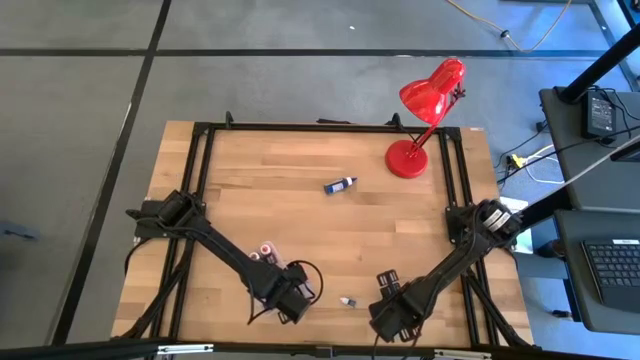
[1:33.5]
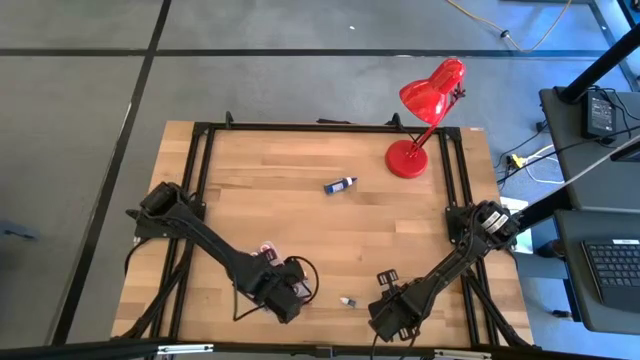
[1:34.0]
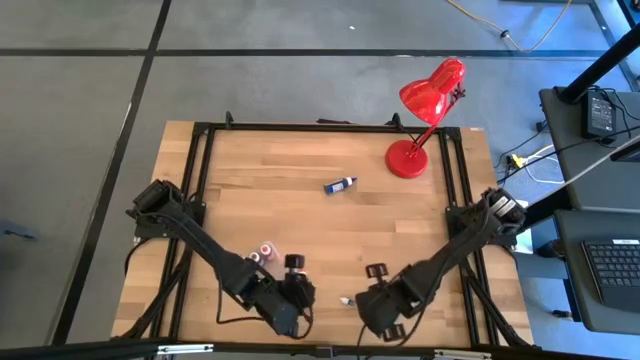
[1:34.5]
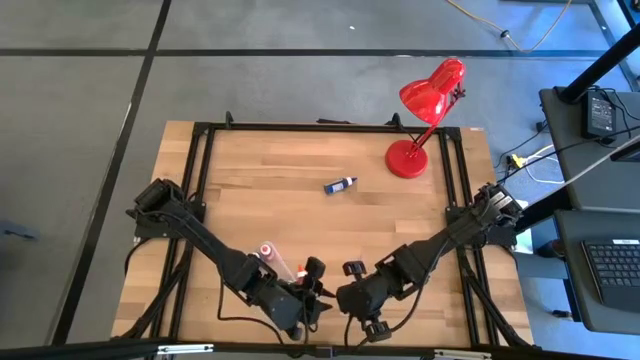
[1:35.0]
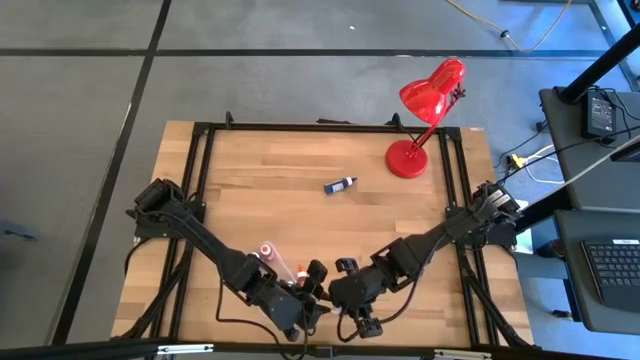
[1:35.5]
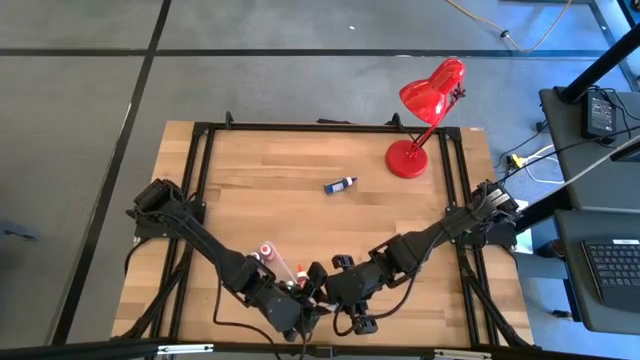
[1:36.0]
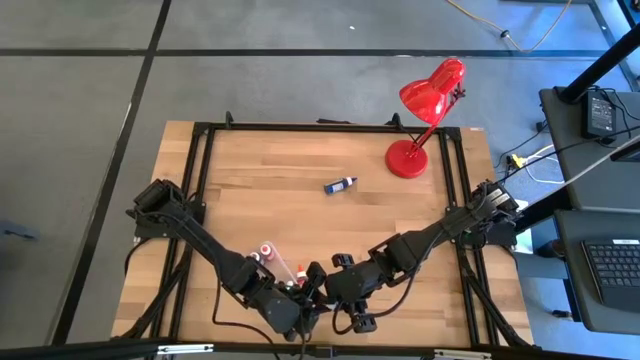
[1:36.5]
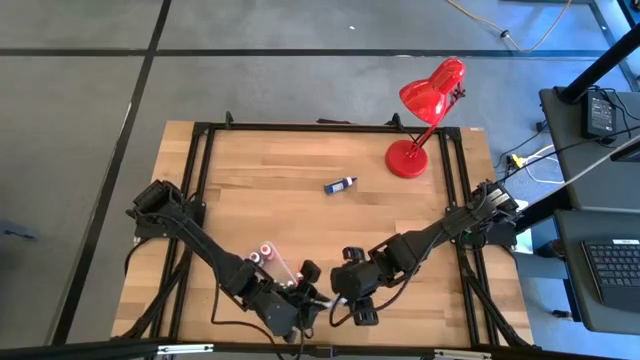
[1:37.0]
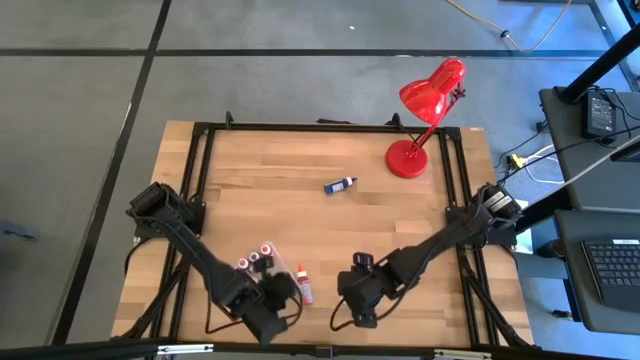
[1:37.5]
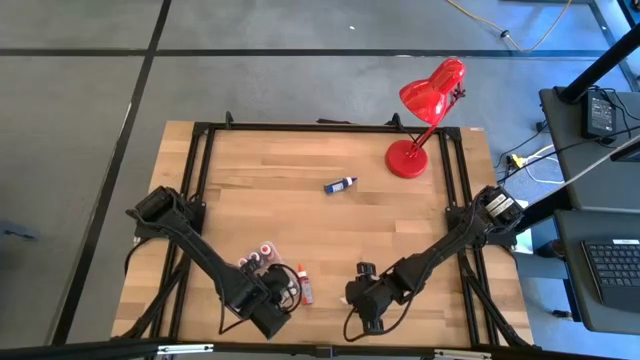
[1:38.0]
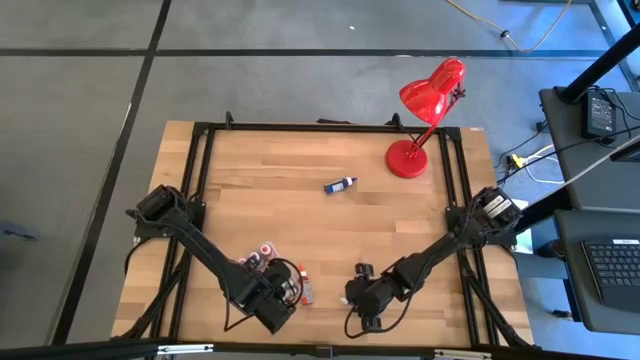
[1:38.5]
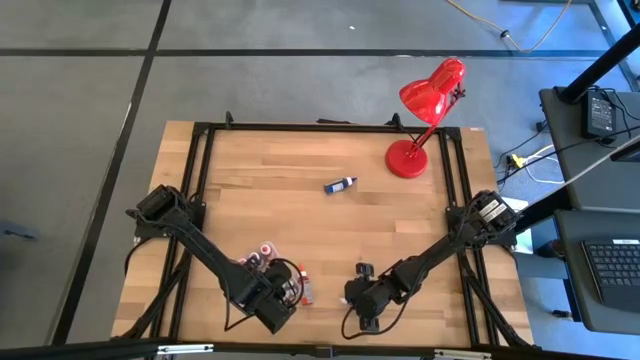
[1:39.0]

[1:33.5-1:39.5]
Task: Pick & Place food coloring
Put the blue food coloring bottle into the transparent bin

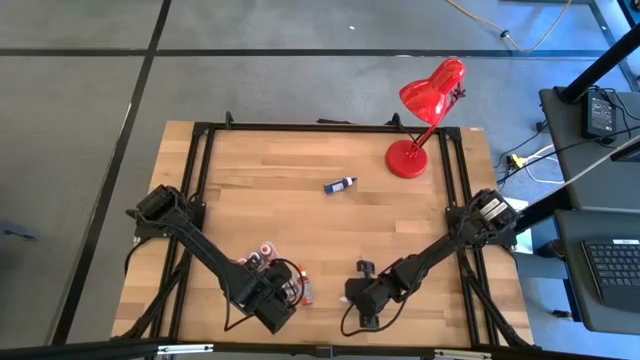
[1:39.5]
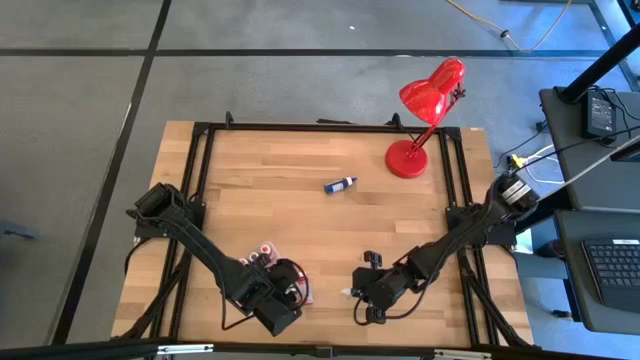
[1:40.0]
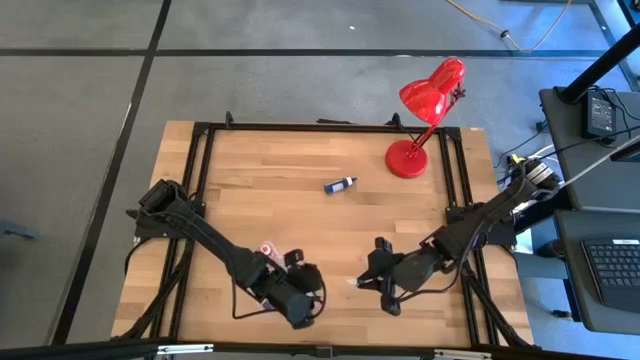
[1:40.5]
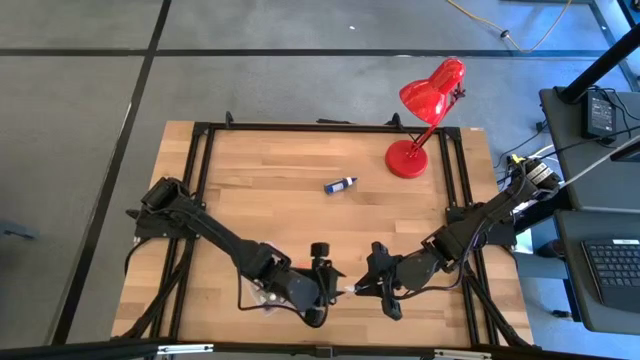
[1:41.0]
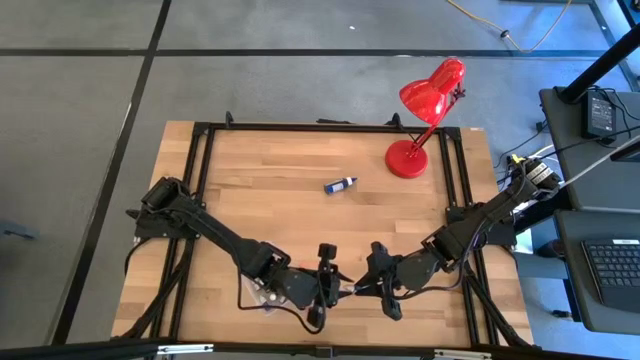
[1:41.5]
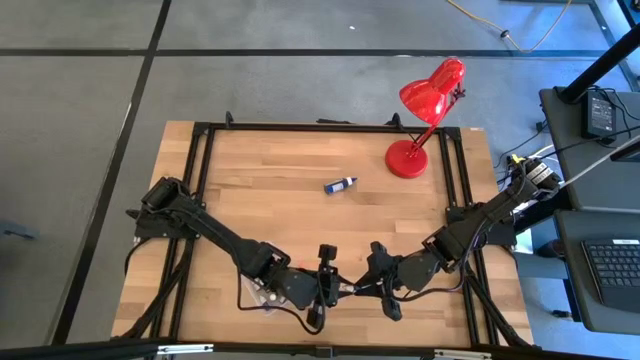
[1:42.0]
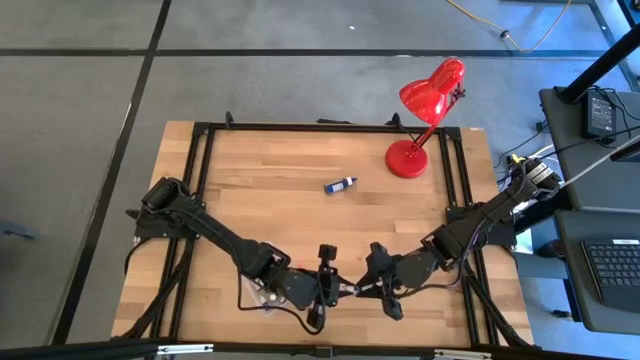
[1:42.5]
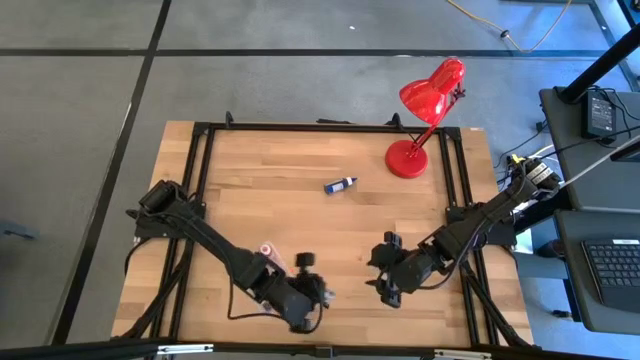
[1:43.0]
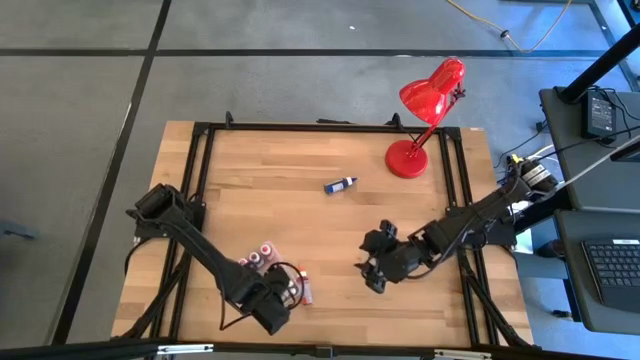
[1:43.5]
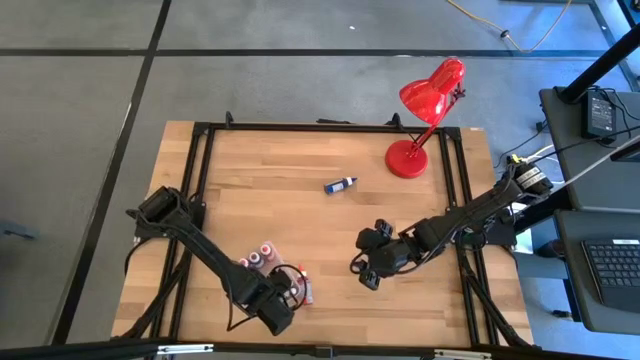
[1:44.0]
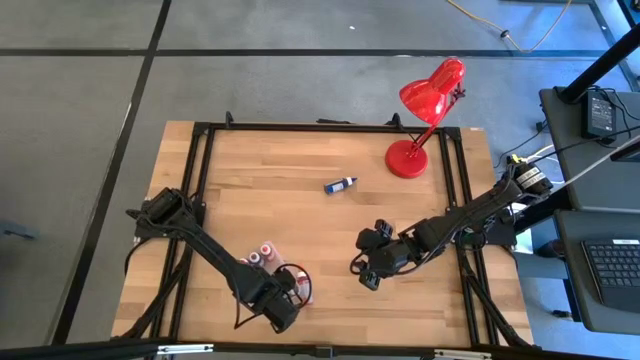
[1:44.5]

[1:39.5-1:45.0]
Put the green food coloring bottle into the transparent bin

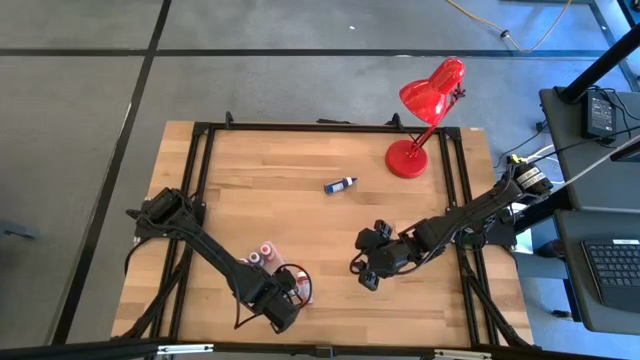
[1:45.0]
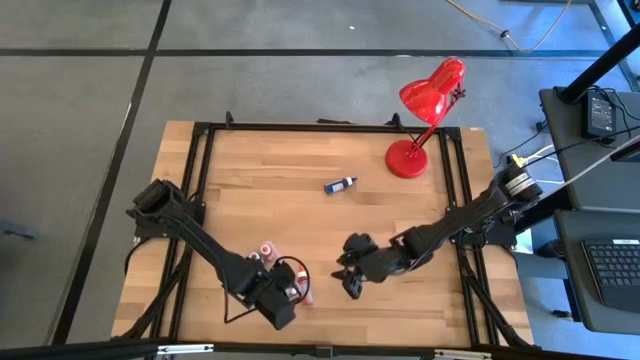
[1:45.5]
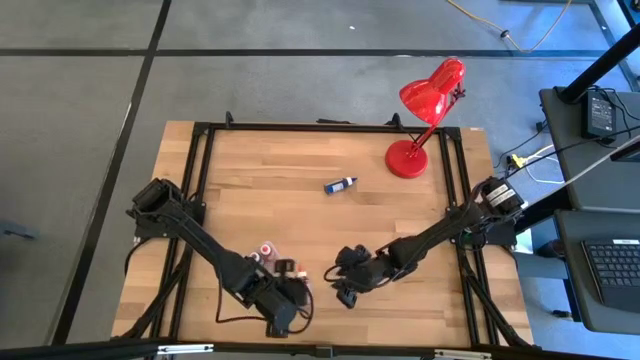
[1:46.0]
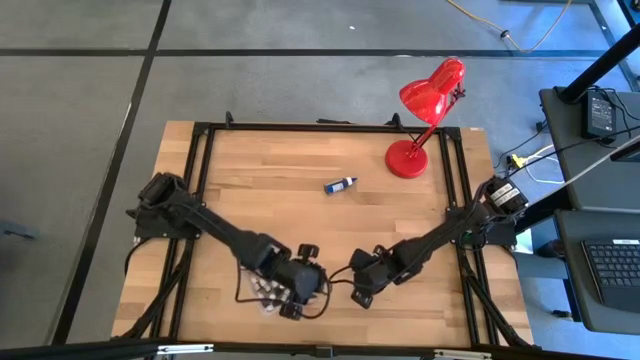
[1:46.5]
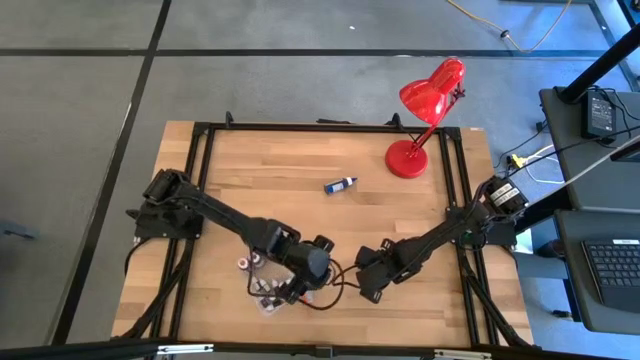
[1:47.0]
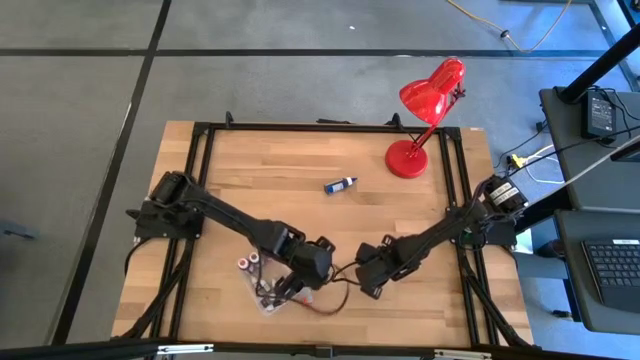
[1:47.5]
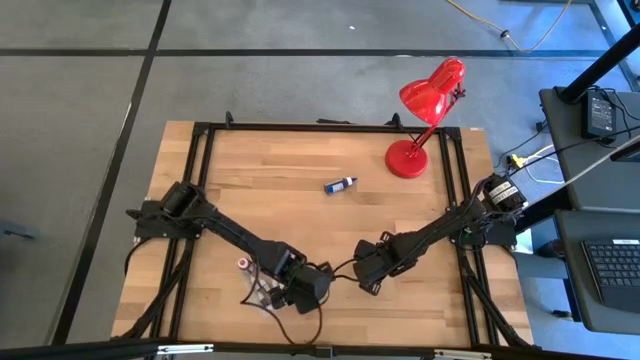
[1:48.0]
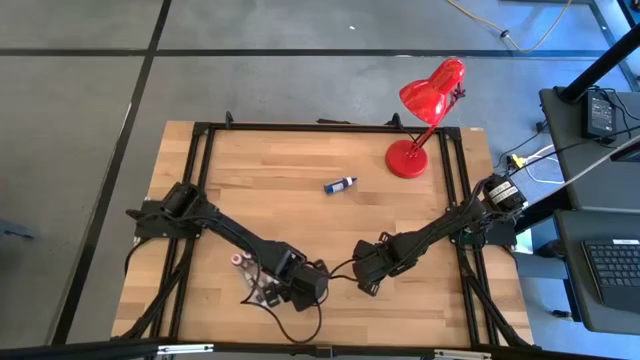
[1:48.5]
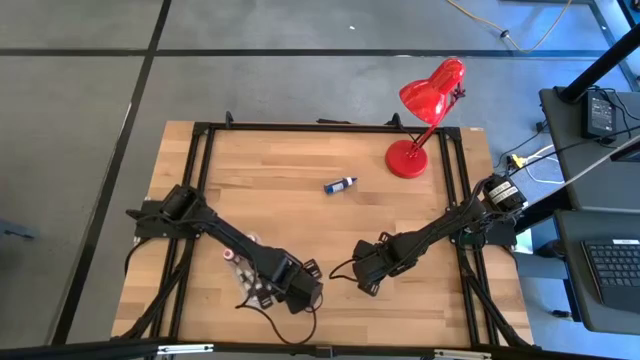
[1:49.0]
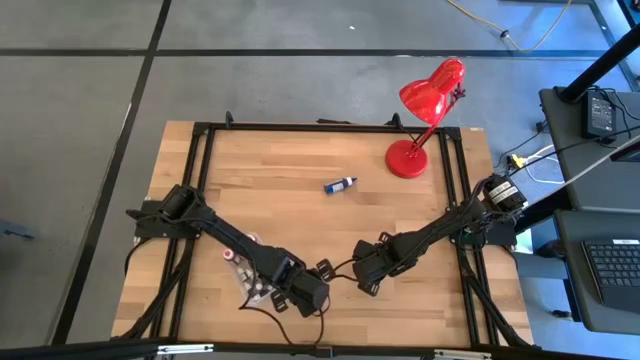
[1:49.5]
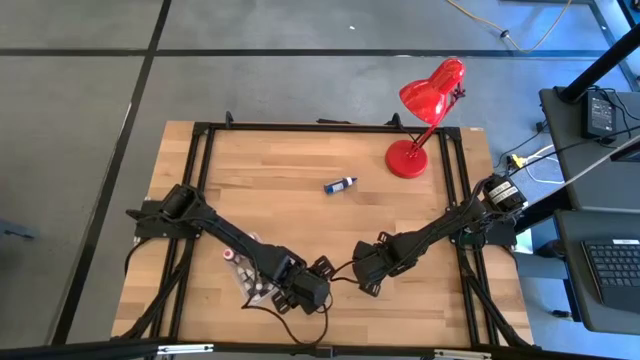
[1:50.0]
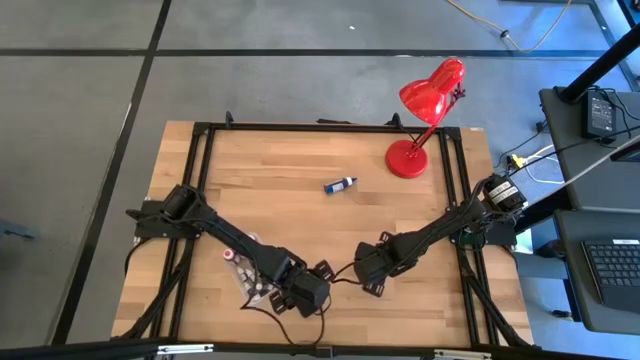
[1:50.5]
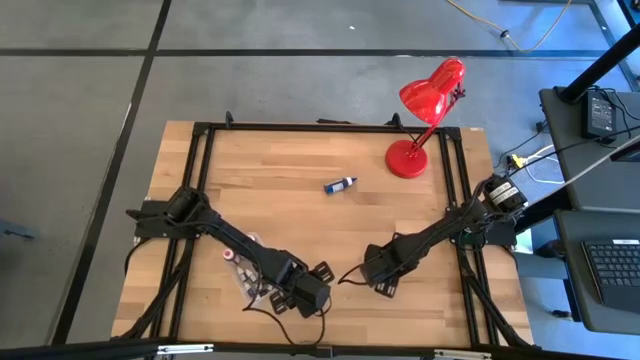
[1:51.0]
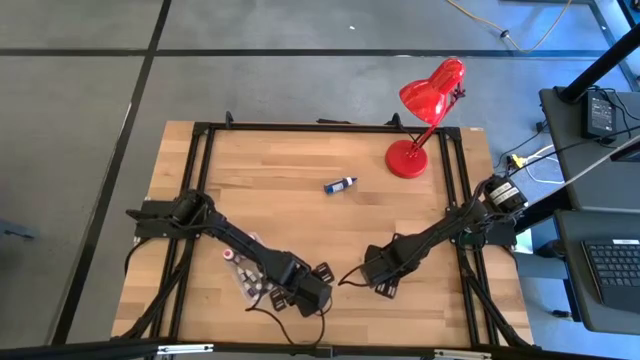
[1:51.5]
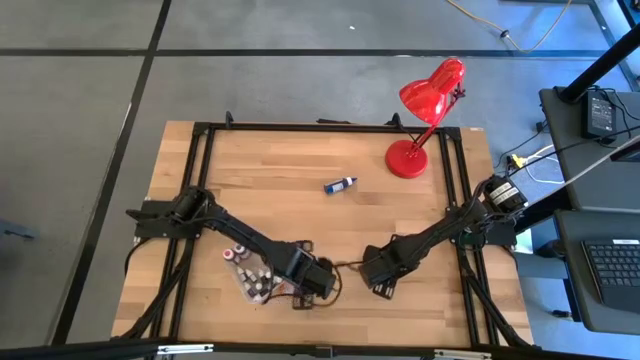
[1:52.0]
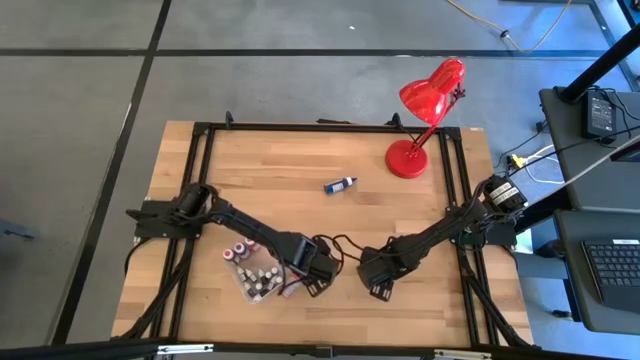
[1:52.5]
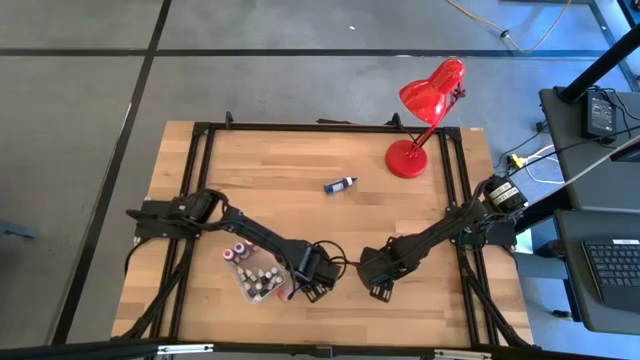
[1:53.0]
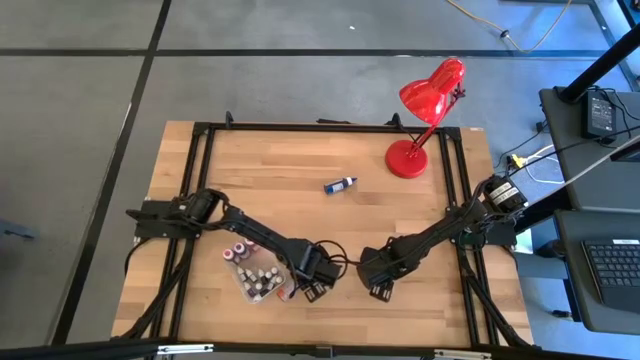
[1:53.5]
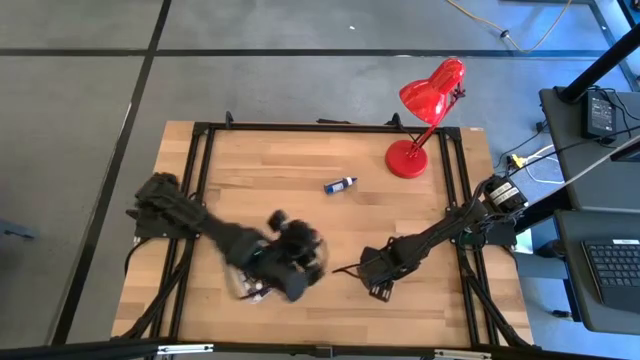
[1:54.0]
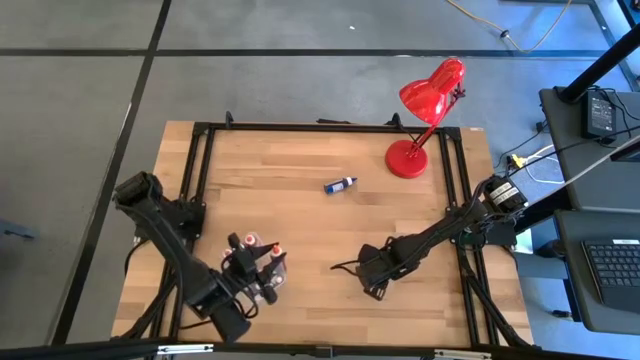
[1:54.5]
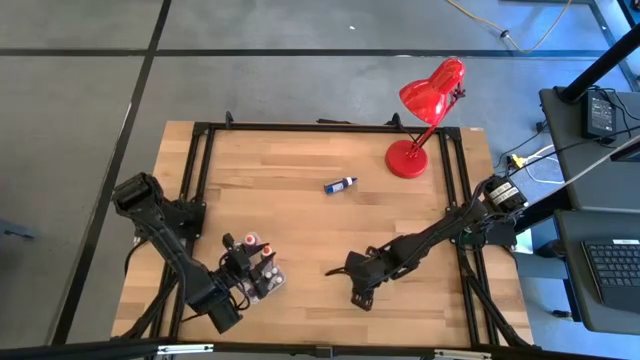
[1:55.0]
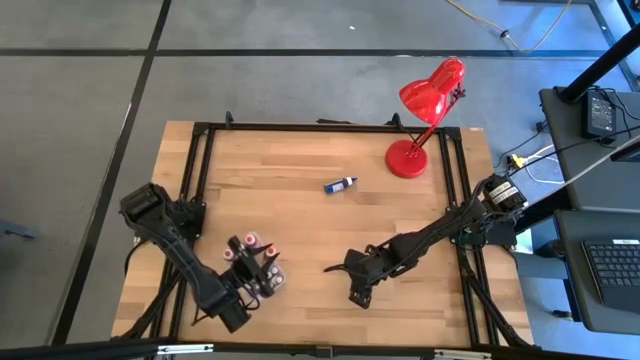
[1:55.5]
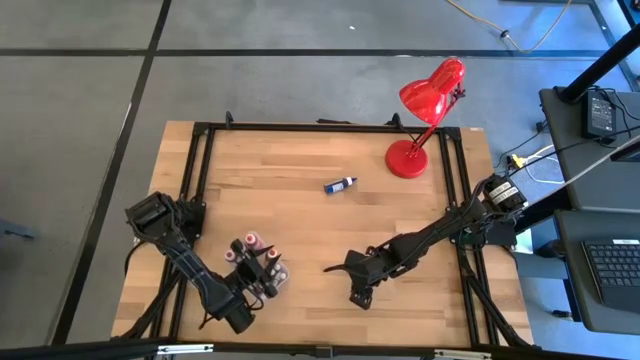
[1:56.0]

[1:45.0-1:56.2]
Put the orange food coloring bottle into the transparent bin
